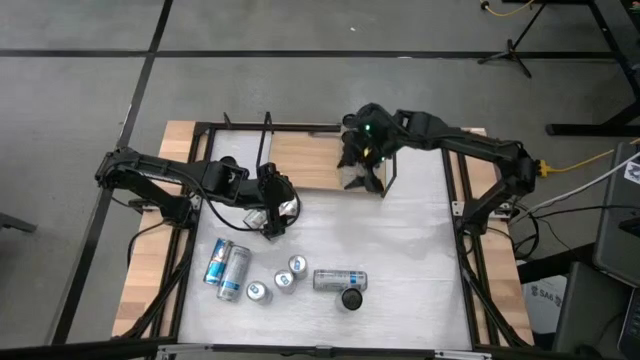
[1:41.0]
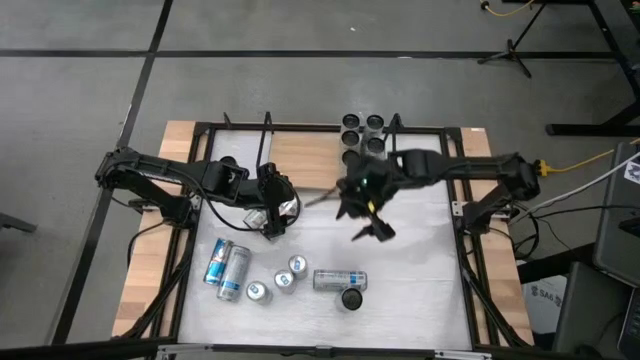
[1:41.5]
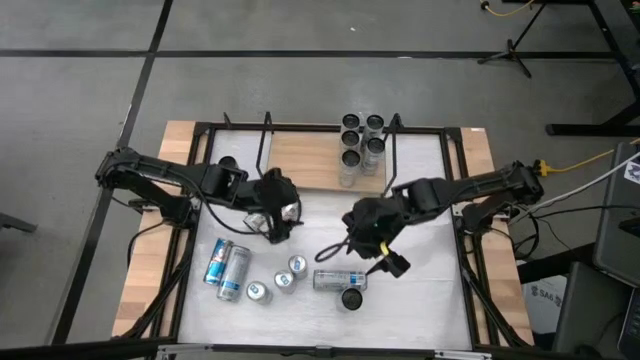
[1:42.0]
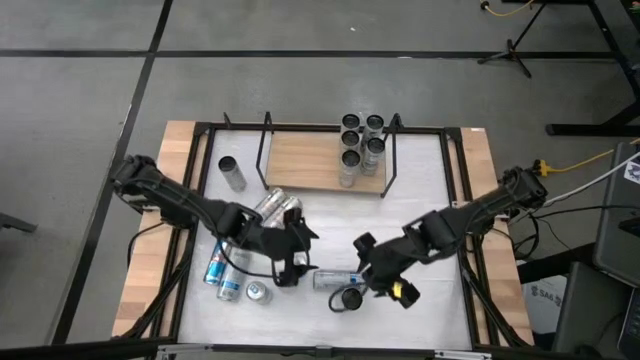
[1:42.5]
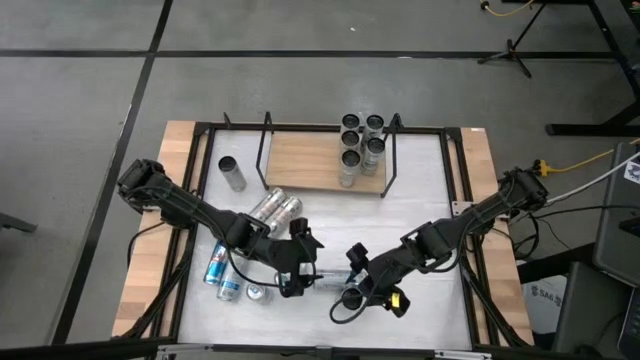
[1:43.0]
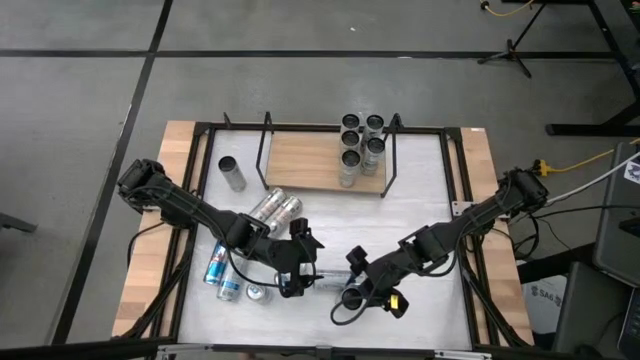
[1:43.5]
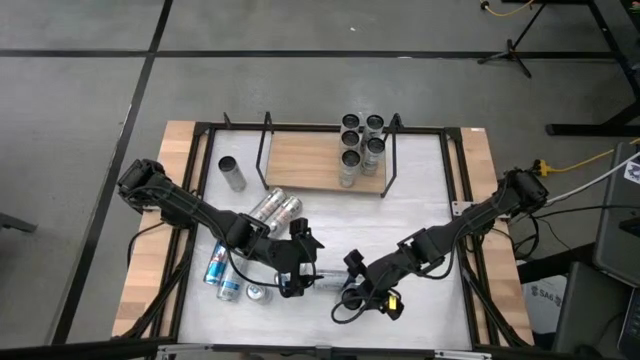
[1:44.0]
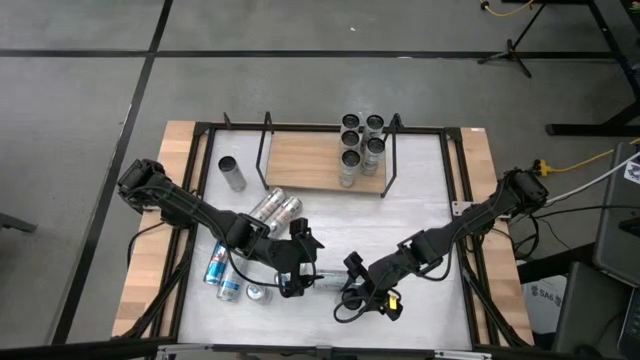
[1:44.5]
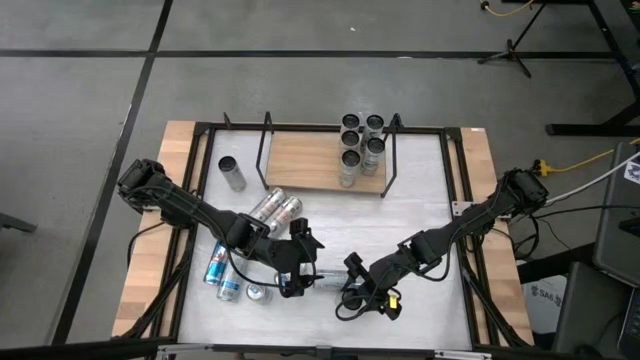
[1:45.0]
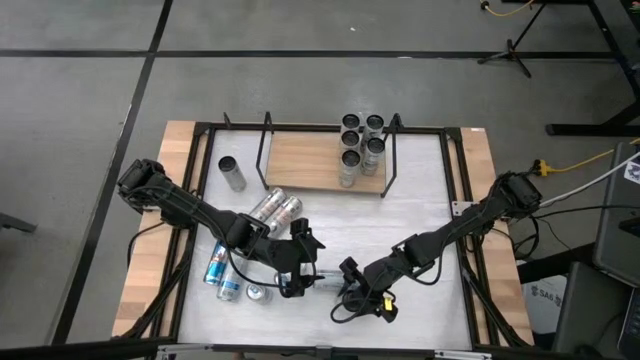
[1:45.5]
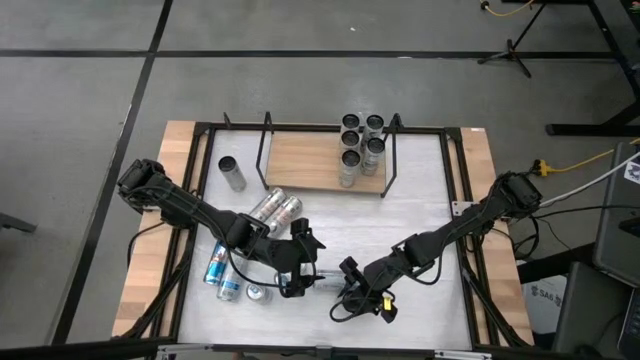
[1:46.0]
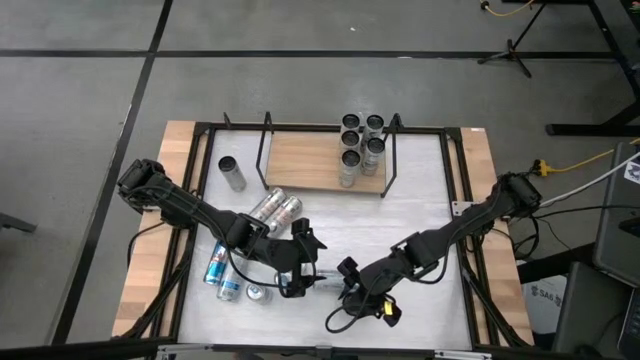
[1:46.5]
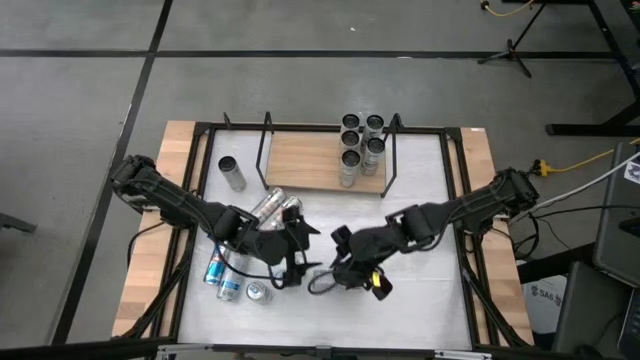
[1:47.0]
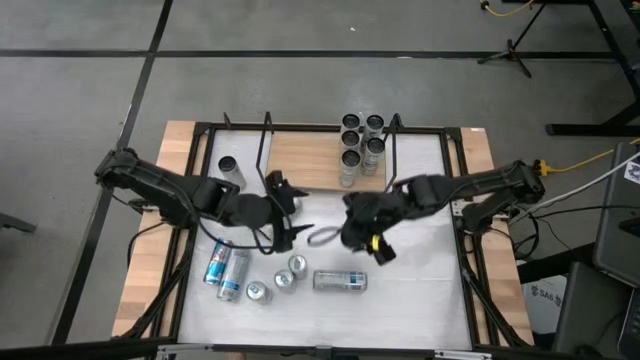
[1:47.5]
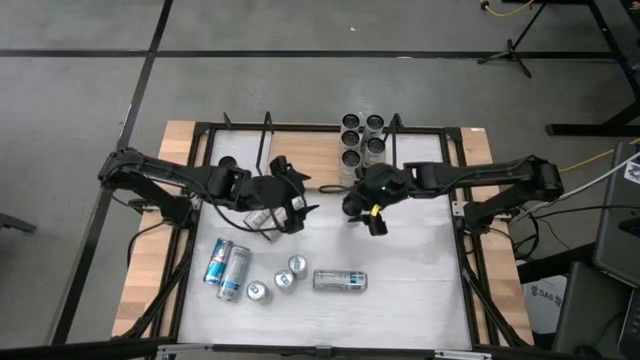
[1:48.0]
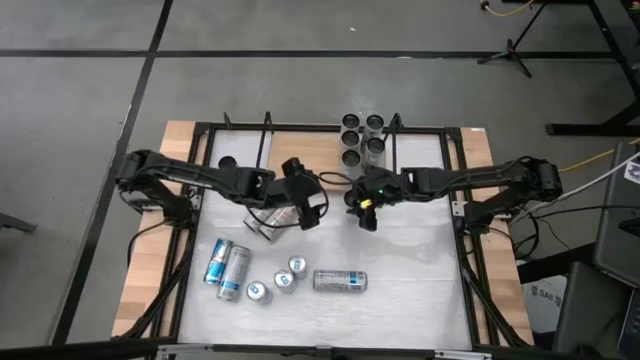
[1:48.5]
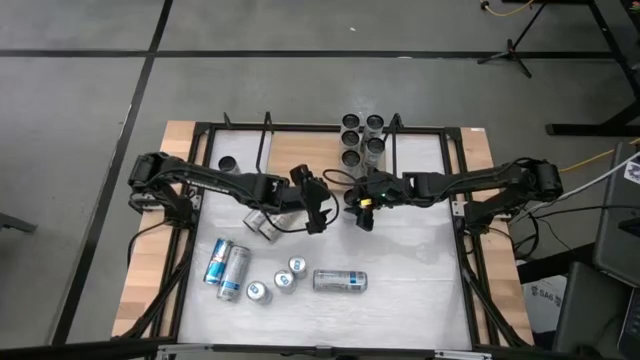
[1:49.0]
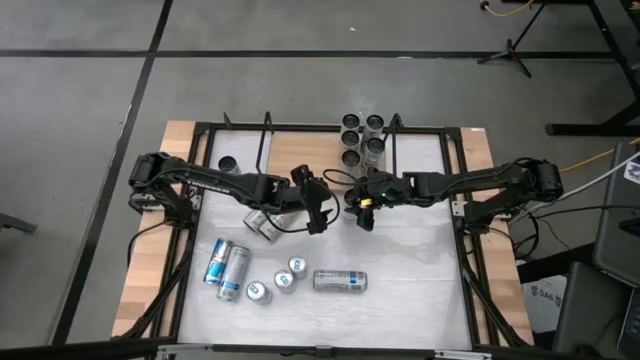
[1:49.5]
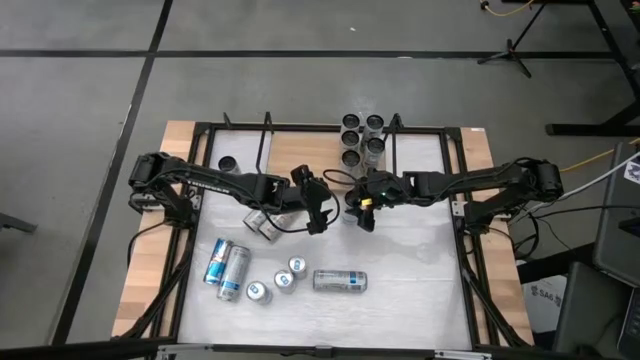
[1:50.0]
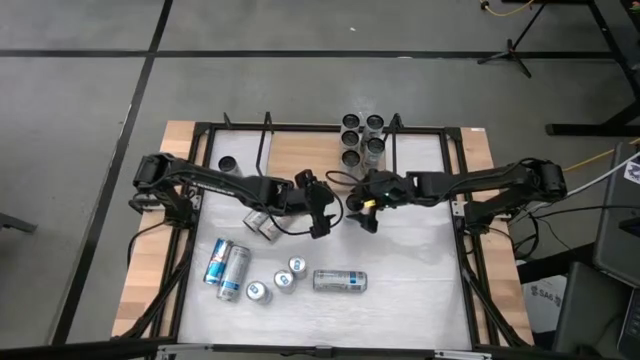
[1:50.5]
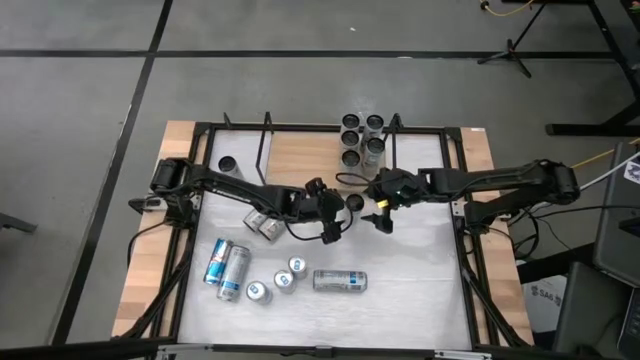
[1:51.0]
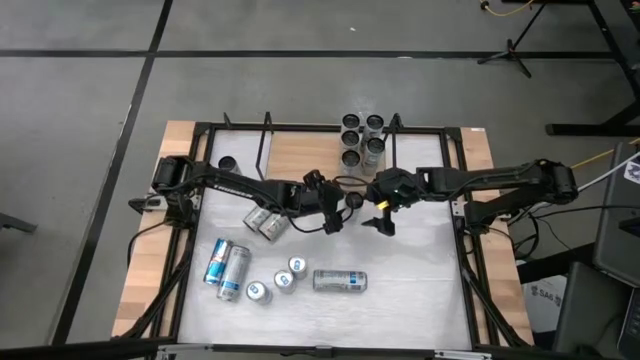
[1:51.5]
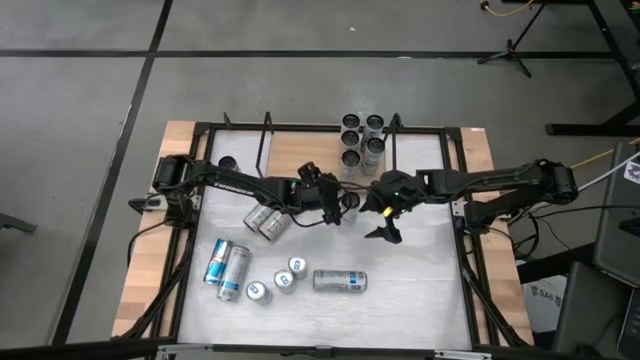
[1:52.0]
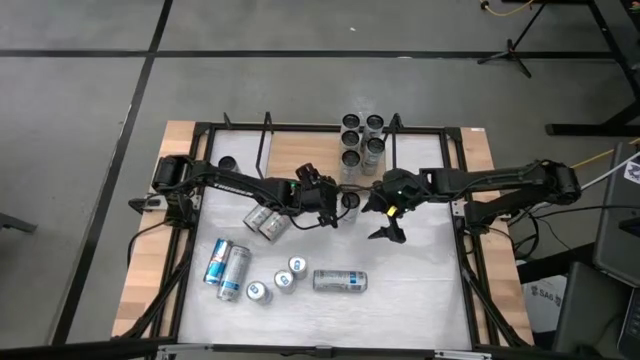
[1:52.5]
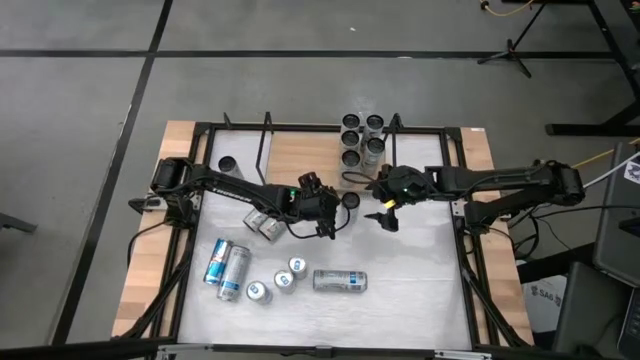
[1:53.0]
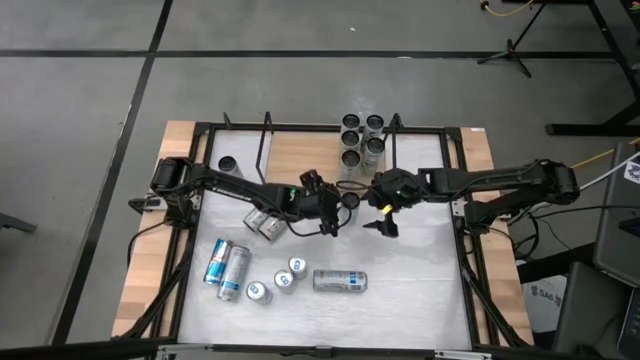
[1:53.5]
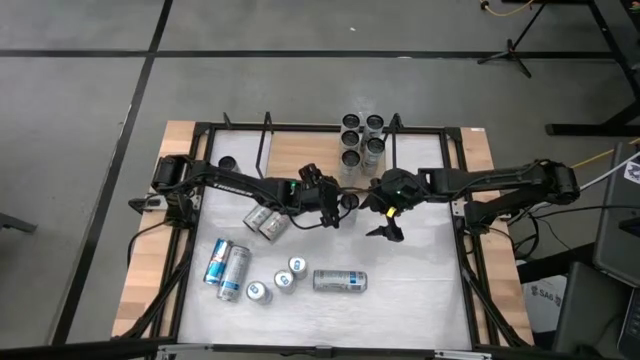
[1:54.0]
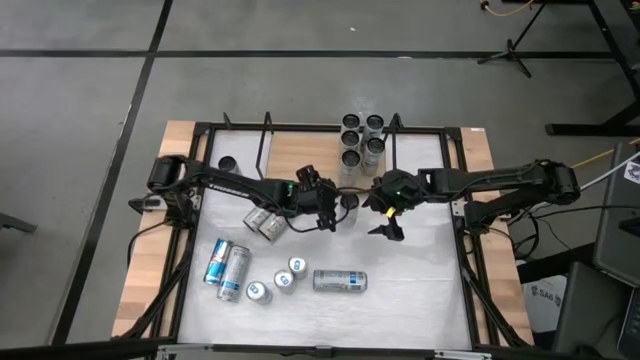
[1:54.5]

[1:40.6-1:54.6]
Task: Place canned beverage on shelf
Put the white soda can aligned with the other white soda can on the shelf

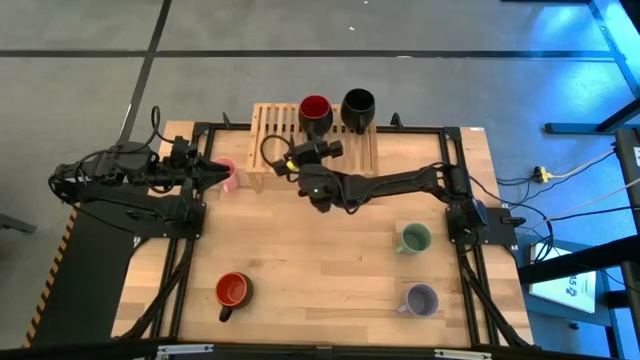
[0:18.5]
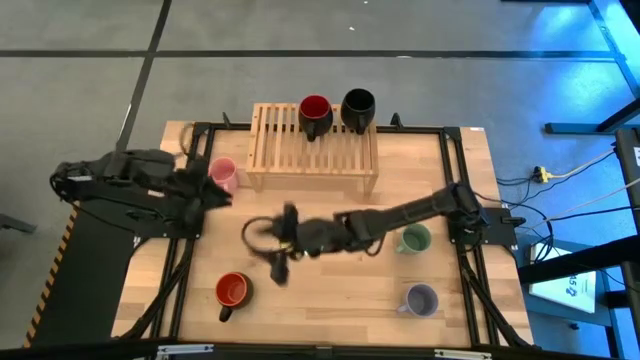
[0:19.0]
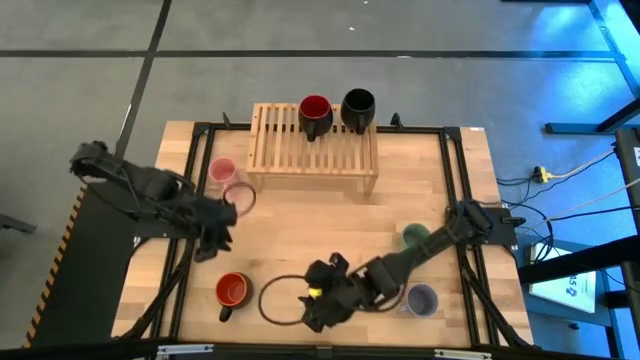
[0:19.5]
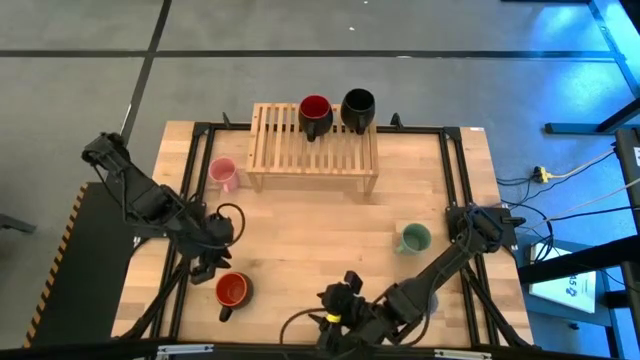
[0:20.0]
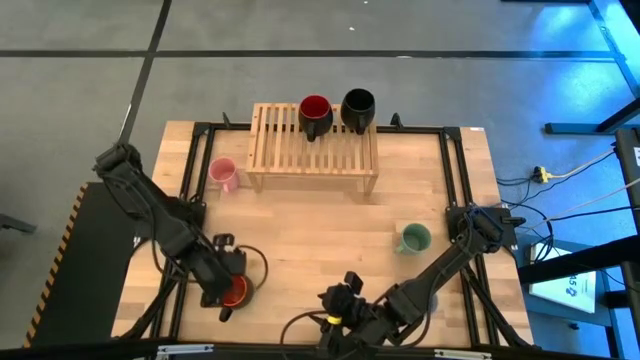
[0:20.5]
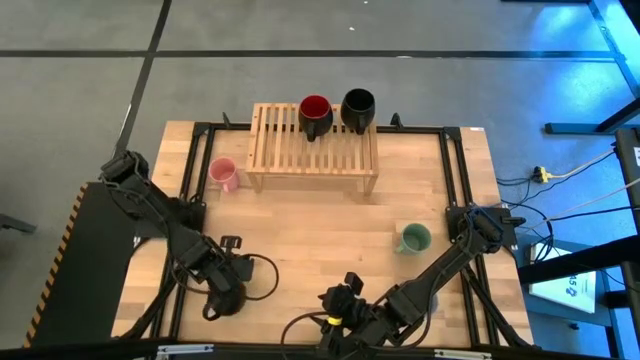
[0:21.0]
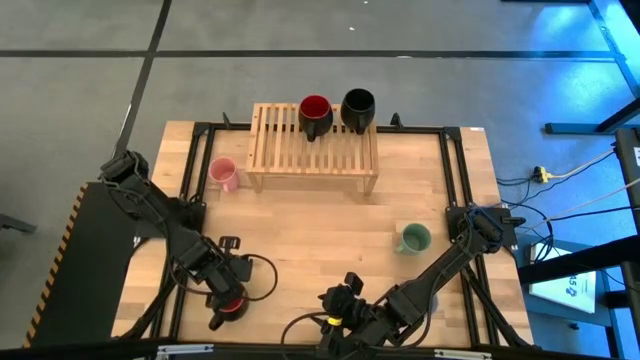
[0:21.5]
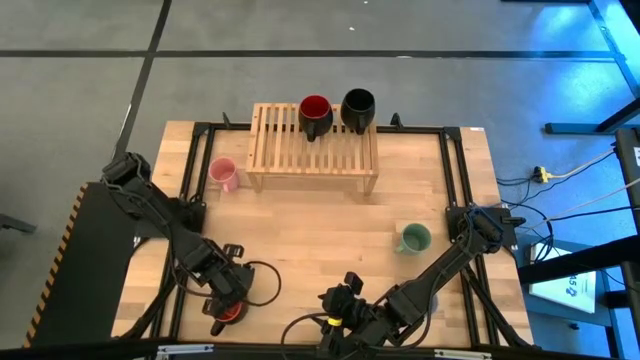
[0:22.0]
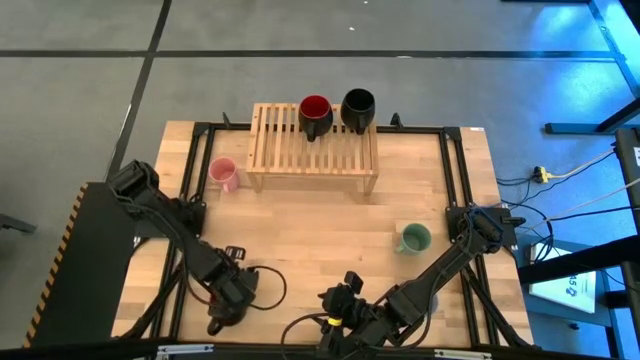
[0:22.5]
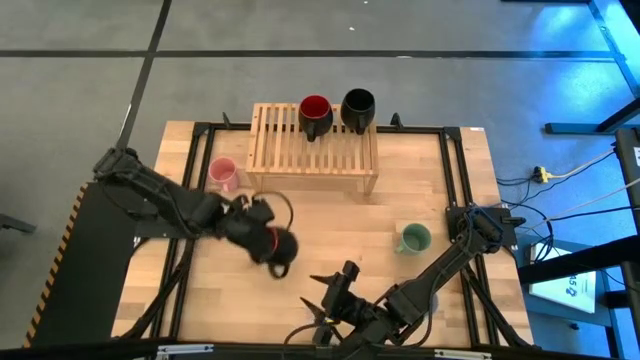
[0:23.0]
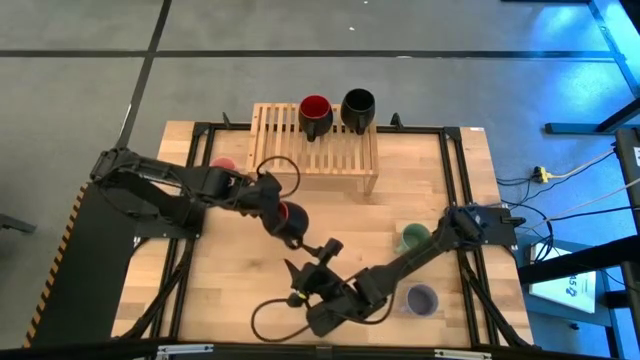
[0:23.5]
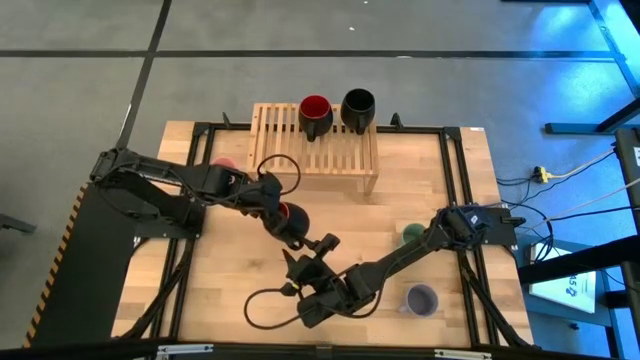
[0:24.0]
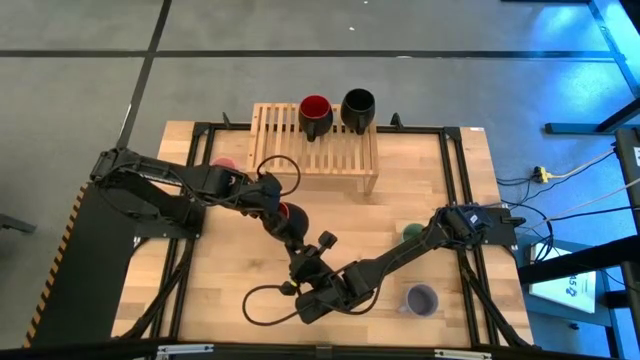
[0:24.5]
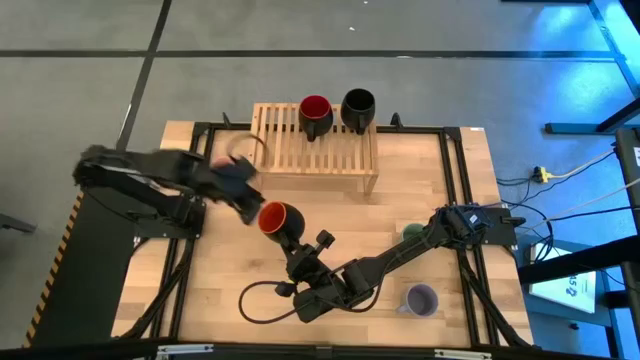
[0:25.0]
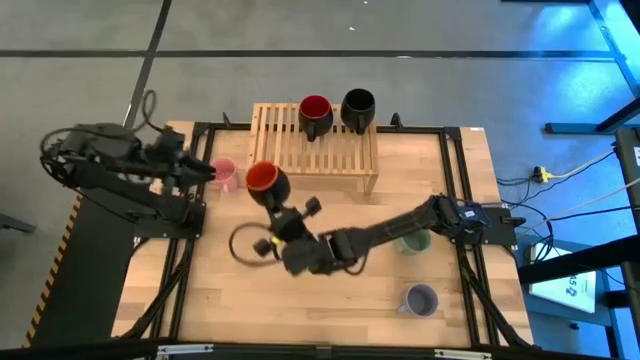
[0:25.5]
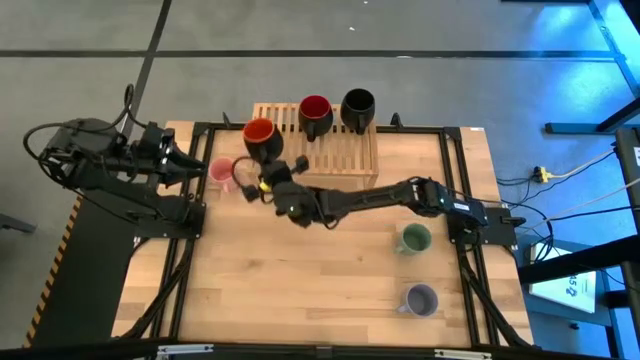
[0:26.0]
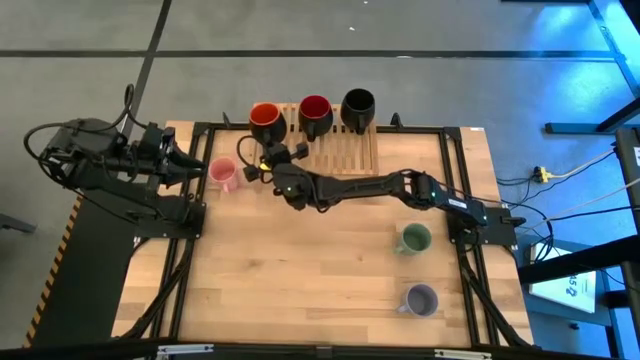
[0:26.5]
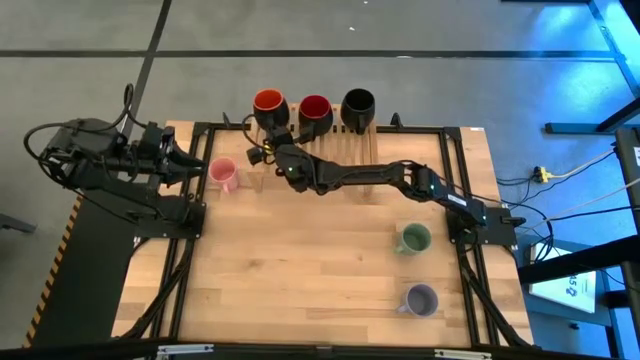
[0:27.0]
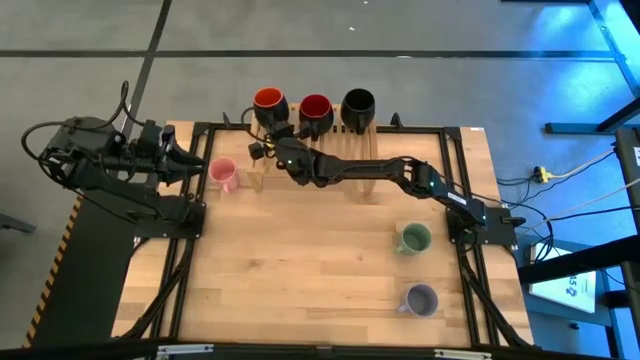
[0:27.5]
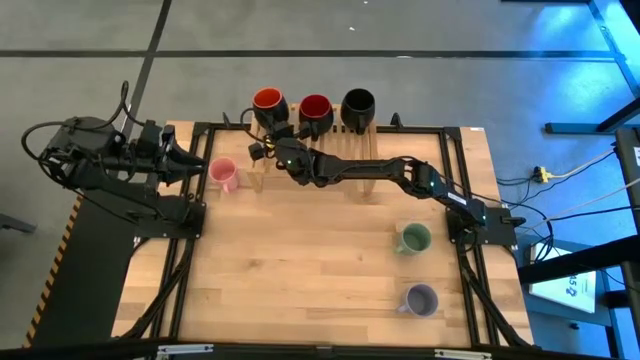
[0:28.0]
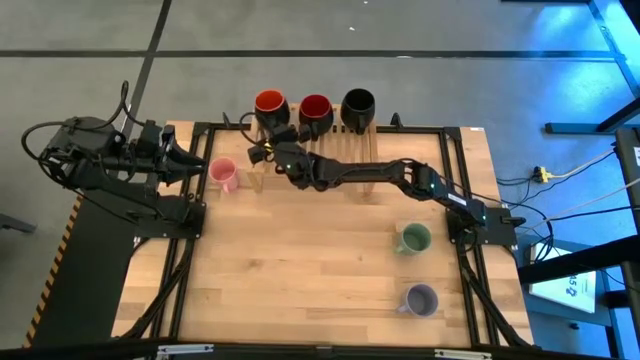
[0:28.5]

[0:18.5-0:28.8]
Task: Place coffee mugs
Put the orange black mug on the shelf
